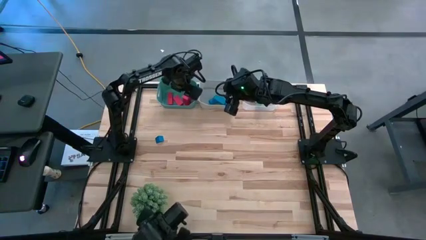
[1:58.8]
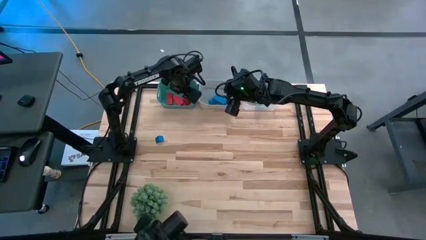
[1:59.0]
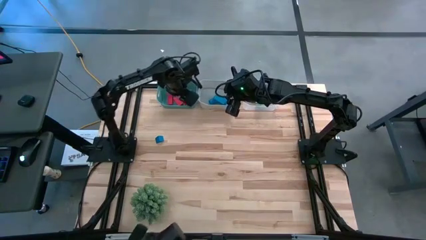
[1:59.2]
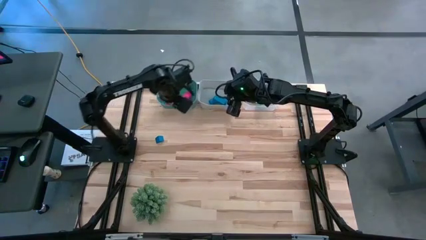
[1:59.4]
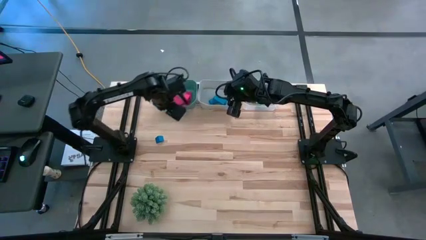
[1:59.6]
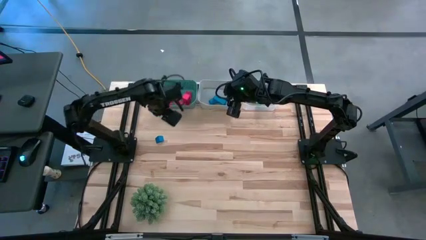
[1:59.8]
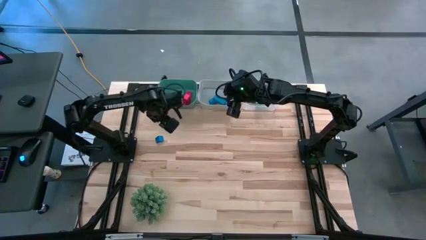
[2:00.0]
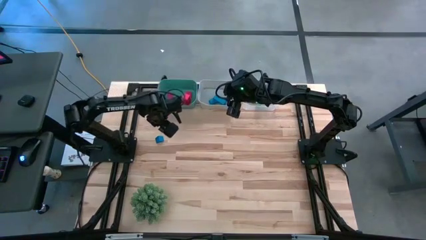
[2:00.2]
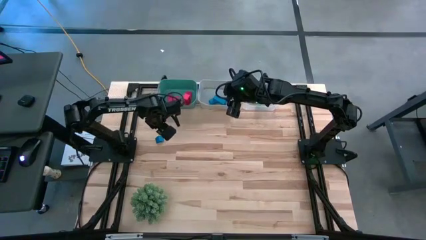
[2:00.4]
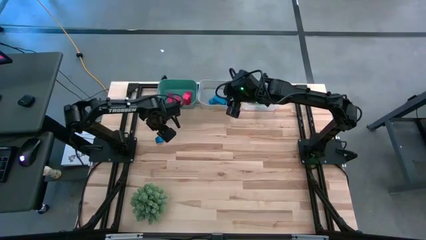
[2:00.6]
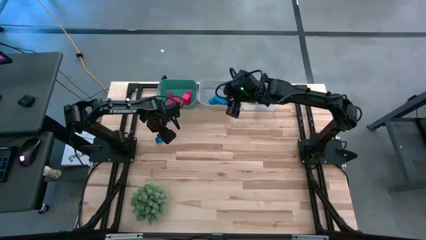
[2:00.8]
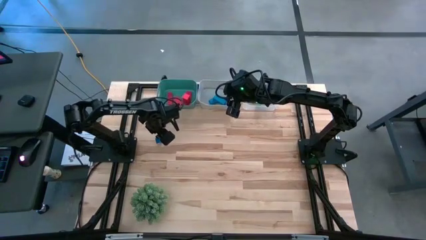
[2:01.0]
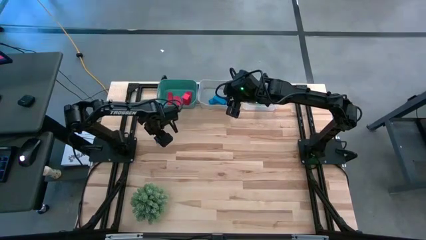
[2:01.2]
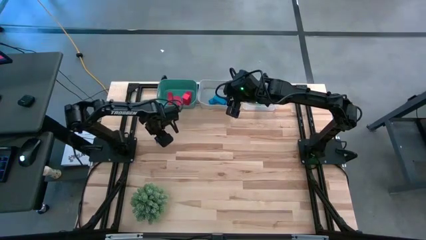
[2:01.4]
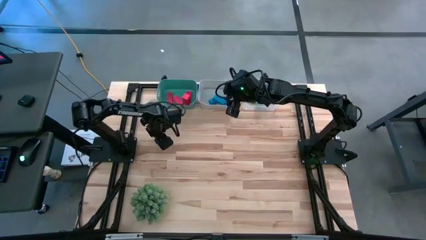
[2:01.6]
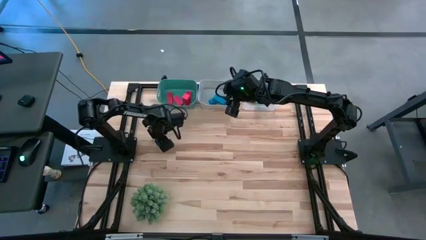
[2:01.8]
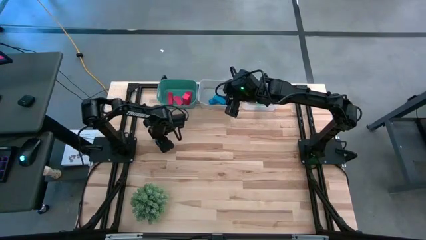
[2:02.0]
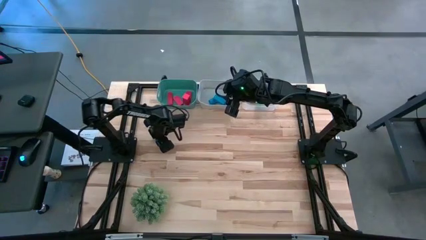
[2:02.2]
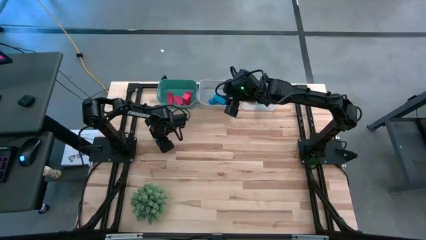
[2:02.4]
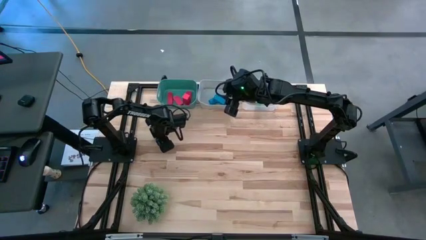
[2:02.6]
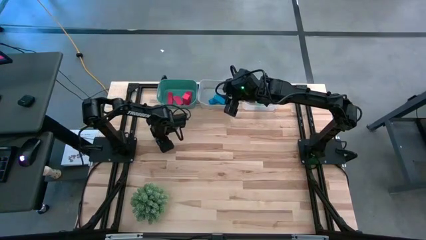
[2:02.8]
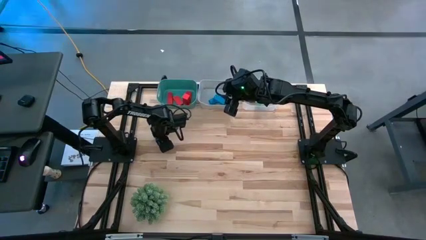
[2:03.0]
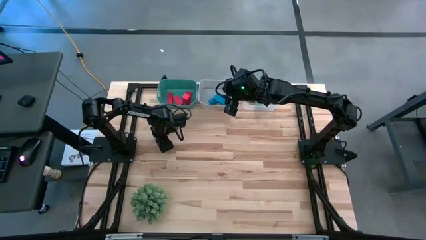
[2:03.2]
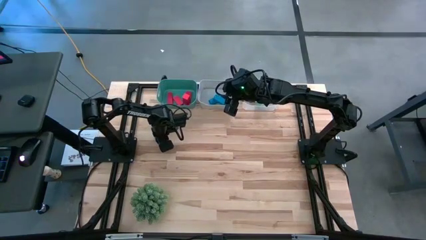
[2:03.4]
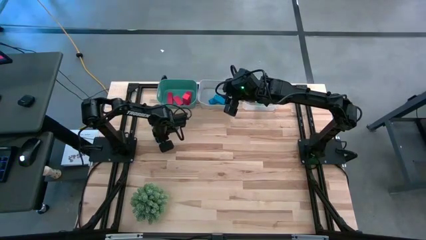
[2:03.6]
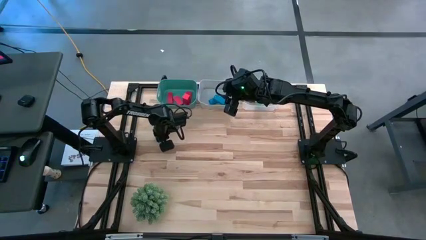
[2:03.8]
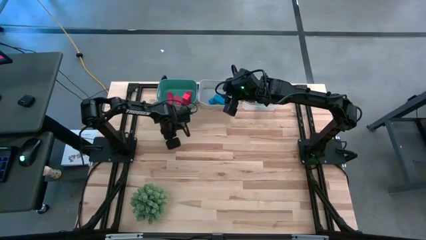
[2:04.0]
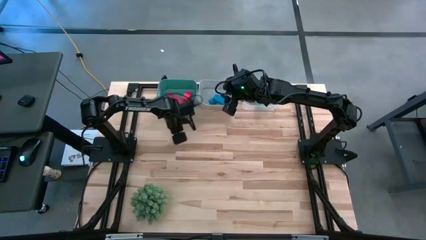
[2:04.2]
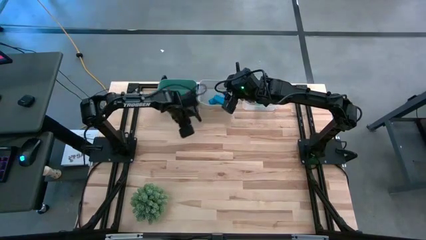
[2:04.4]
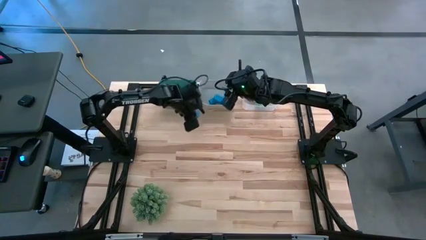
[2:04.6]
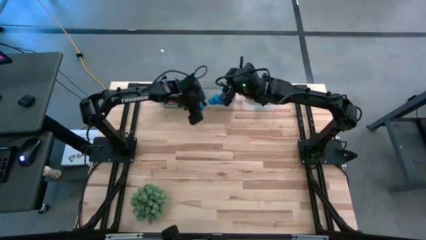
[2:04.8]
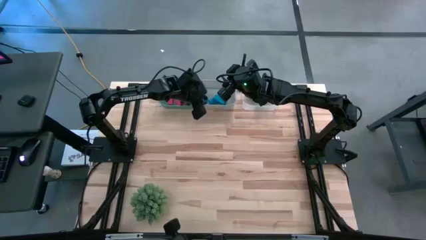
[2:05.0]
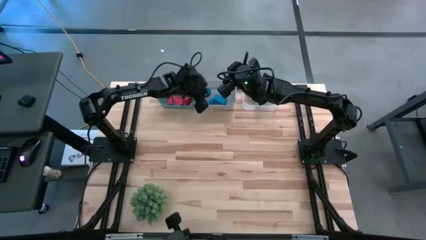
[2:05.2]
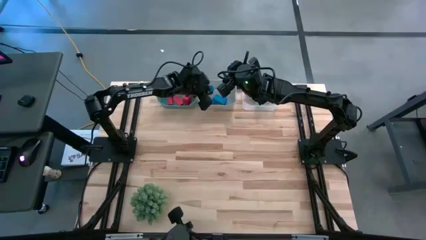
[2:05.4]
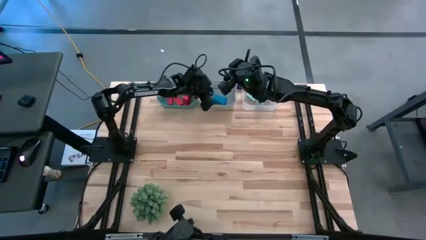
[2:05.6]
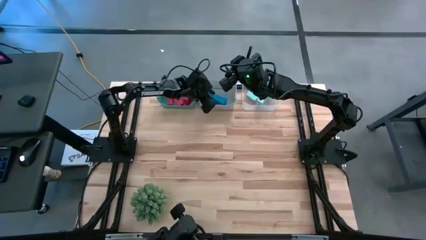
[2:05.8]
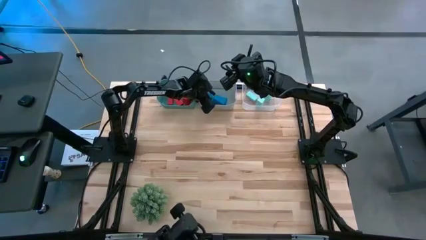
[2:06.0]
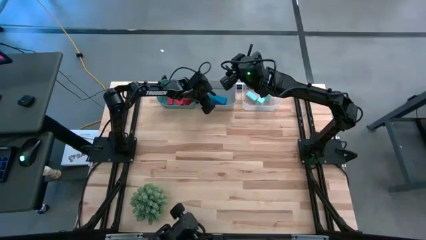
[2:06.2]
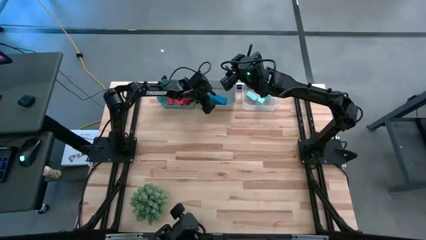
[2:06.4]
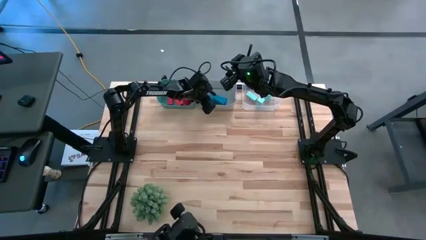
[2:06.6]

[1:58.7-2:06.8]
Task: Sort & place blocks by color
Put the blue block into the gray bin

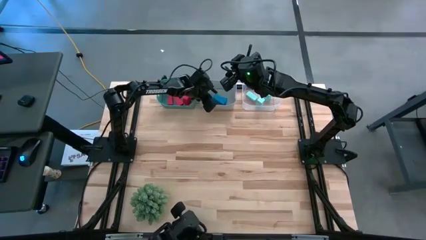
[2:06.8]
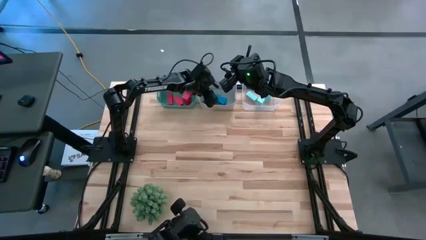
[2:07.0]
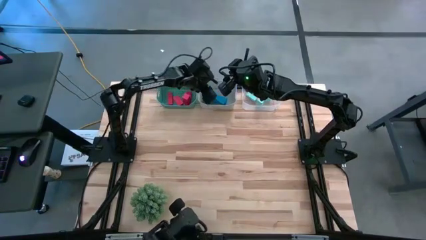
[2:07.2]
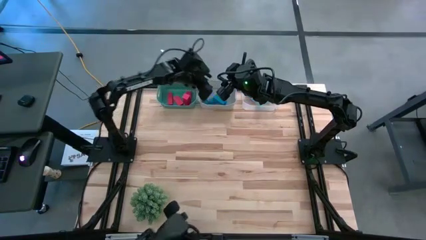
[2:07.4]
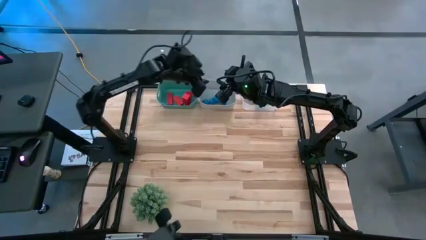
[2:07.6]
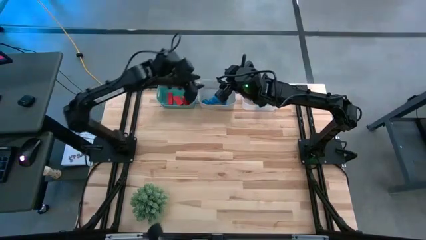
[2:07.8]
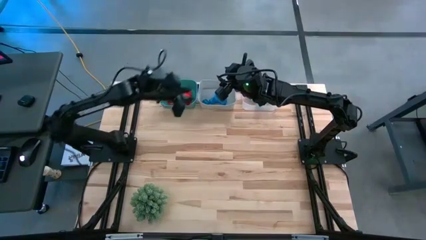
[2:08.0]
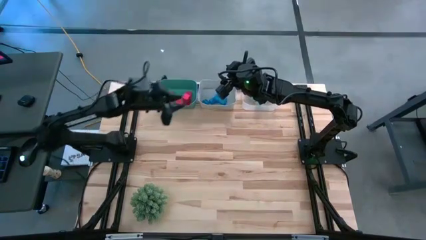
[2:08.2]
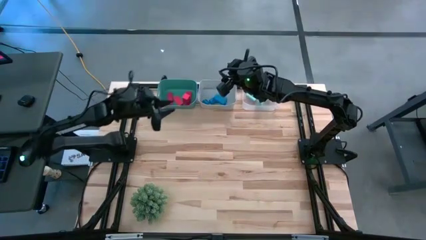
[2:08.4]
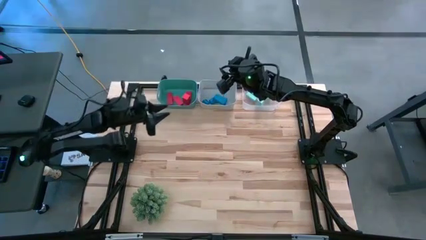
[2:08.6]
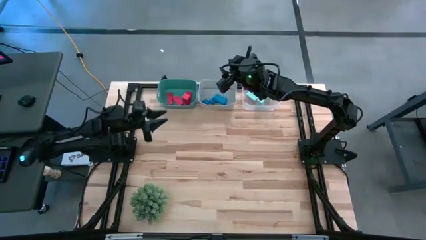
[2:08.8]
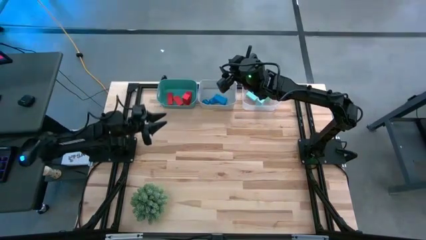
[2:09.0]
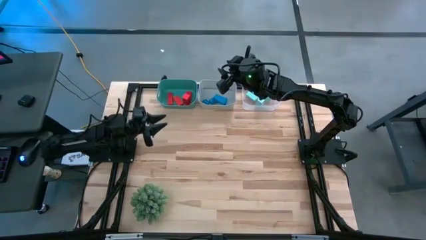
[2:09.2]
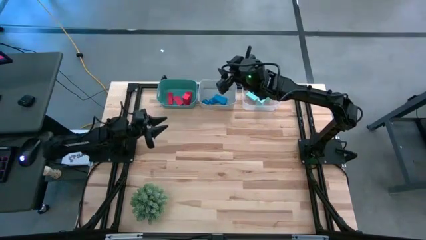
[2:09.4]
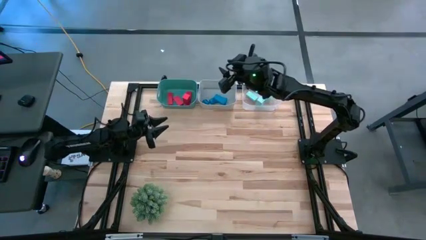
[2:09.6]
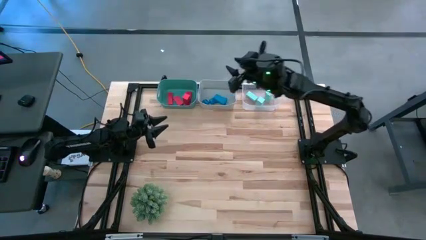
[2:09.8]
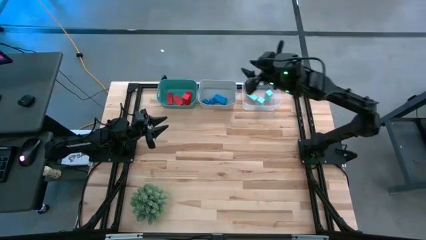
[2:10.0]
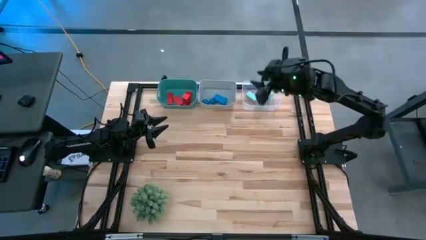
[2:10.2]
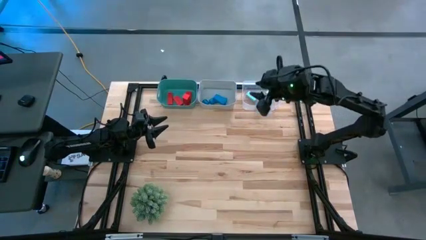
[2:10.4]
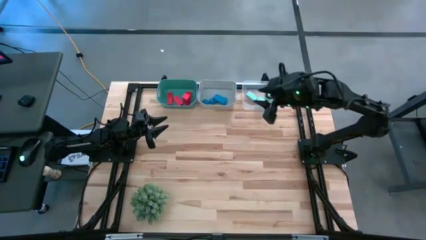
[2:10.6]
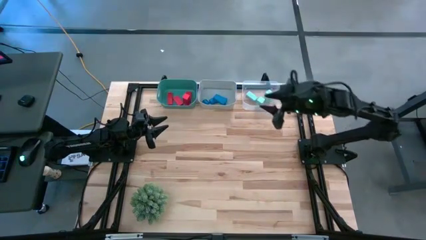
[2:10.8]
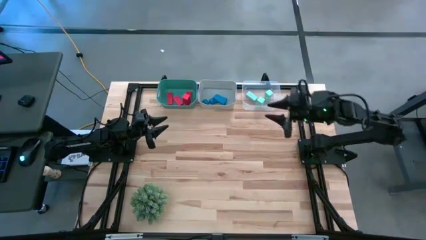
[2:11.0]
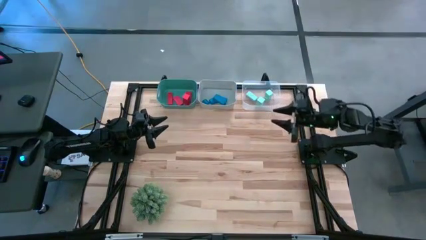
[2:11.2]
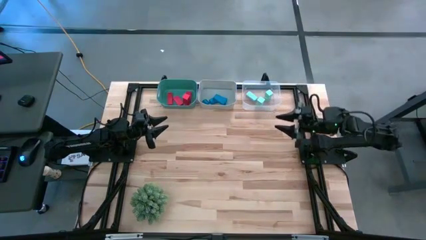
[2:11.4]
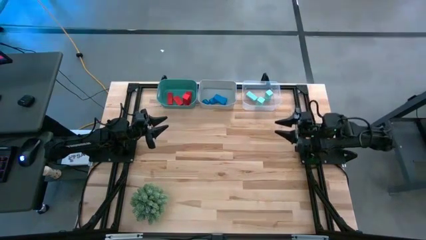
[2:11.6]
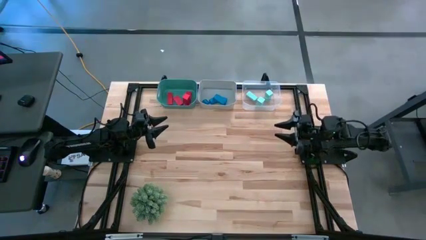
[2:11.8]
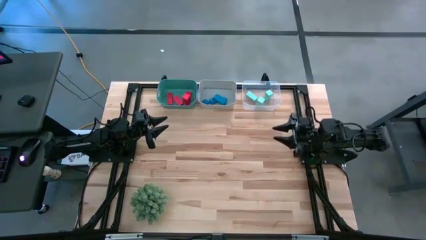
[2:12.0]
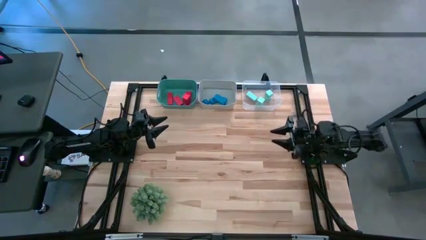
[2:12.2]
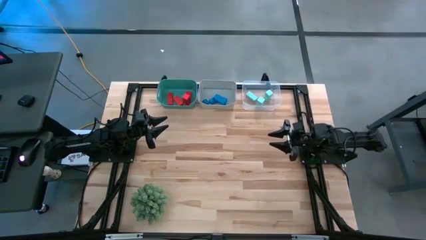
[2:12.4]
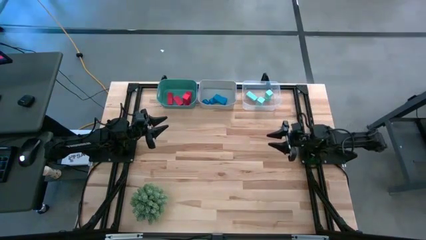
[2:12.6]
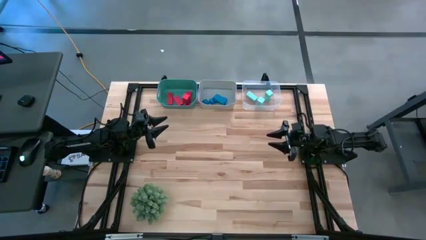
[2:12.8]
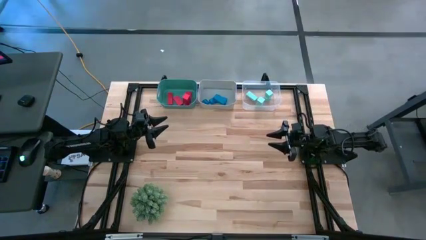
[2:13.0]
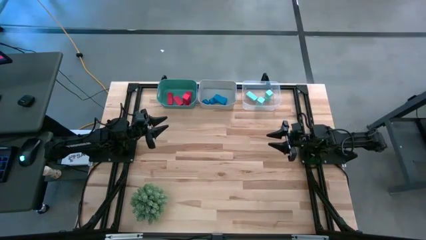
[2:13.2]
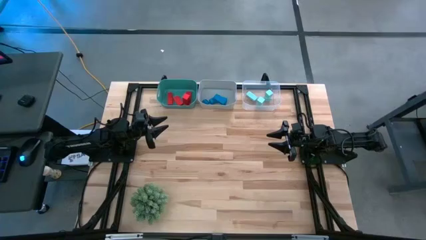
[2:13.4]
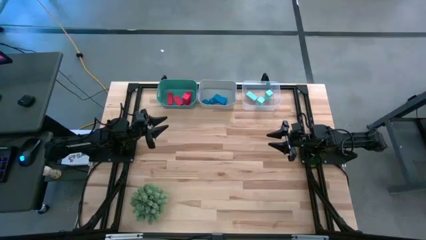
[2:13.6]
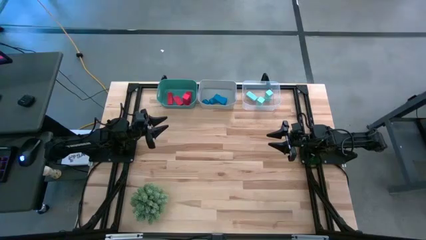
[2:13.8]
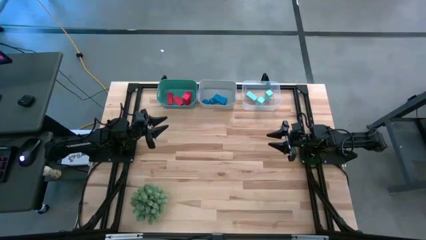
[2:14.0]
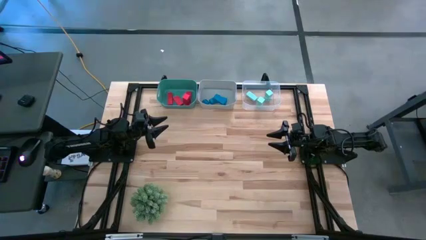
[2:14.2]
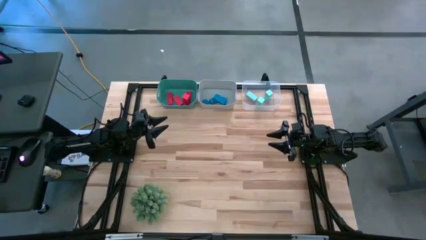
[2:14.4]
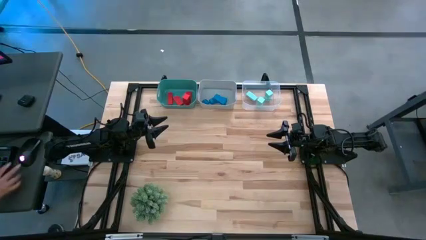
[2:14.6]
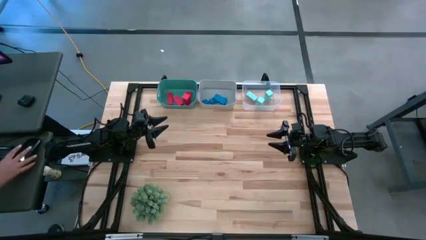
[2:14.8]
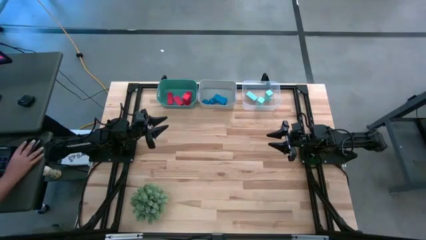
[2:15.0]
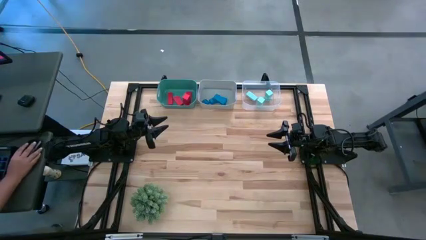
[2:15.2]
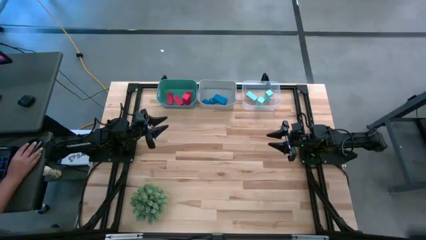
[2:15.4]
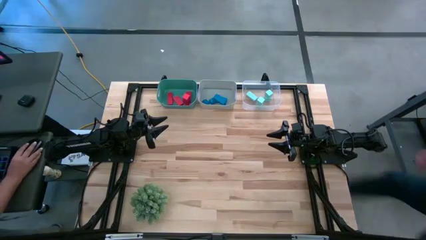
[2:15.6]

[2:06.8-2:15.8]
Return to Home Position
